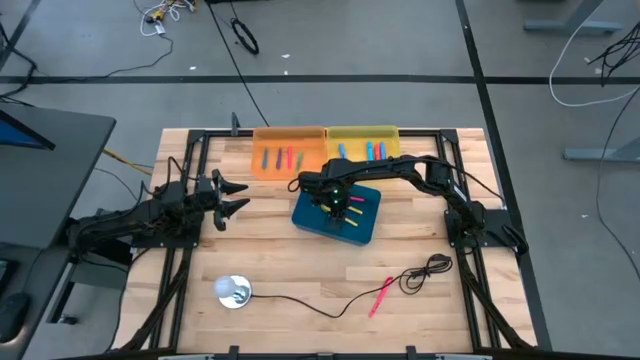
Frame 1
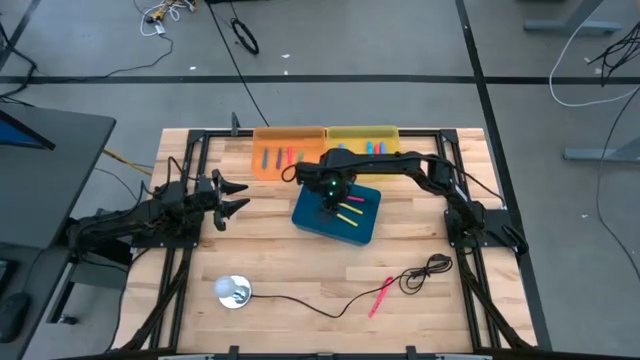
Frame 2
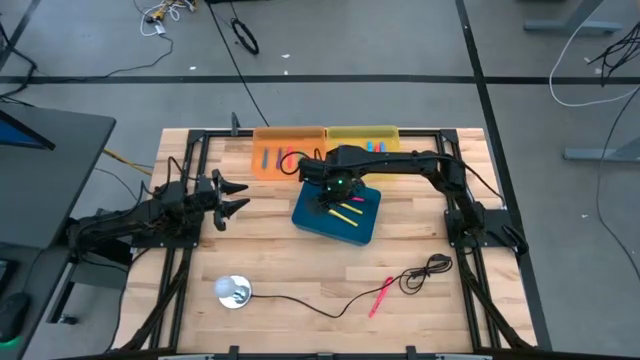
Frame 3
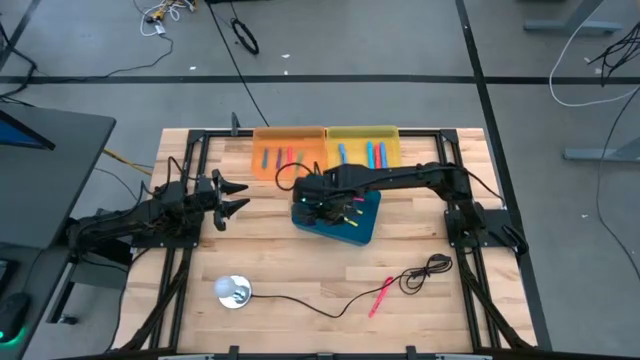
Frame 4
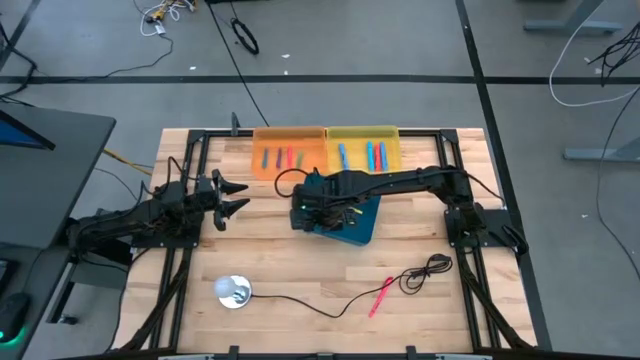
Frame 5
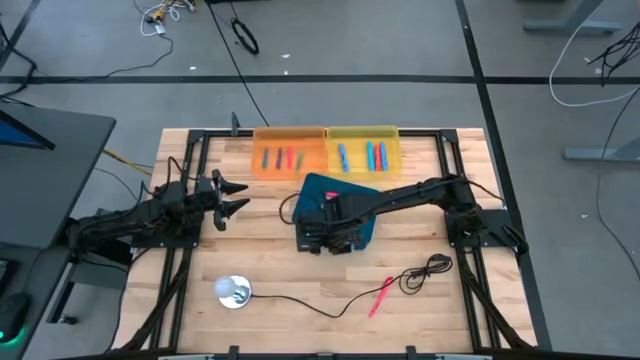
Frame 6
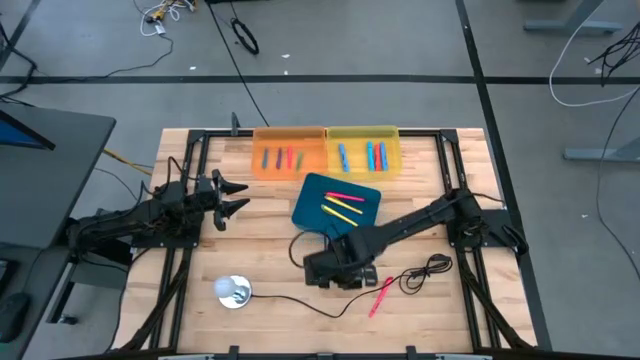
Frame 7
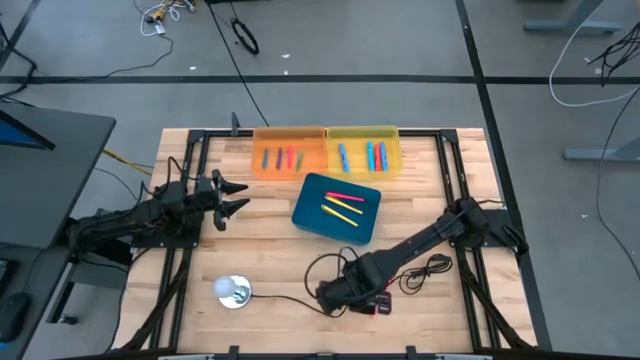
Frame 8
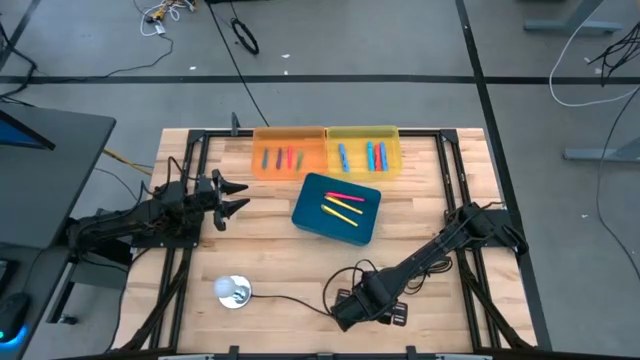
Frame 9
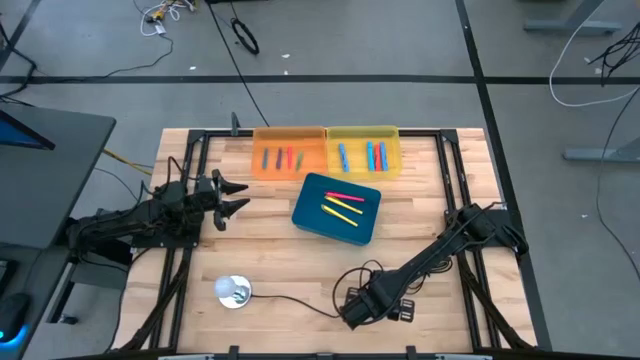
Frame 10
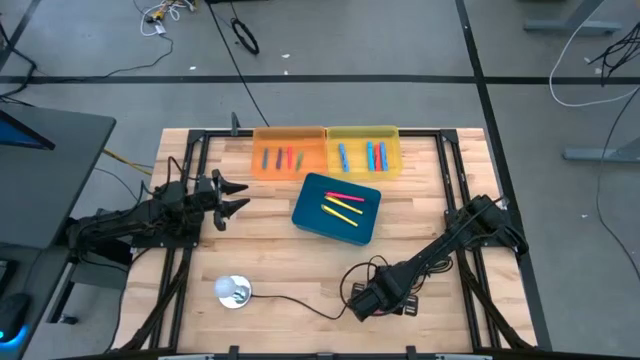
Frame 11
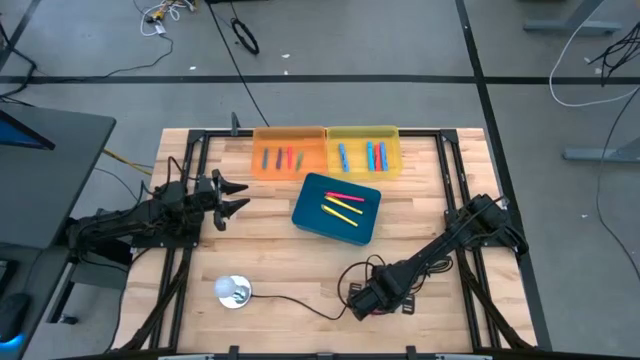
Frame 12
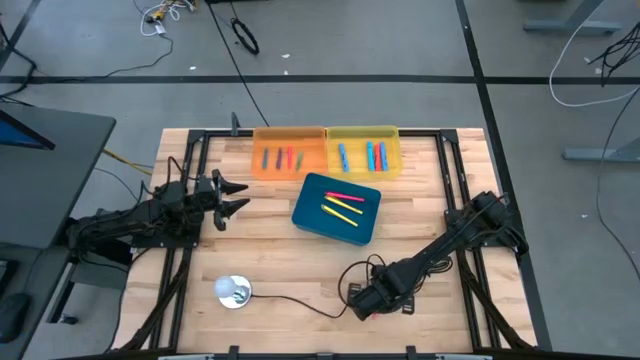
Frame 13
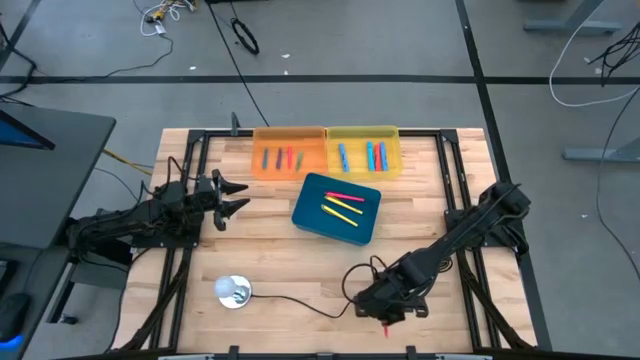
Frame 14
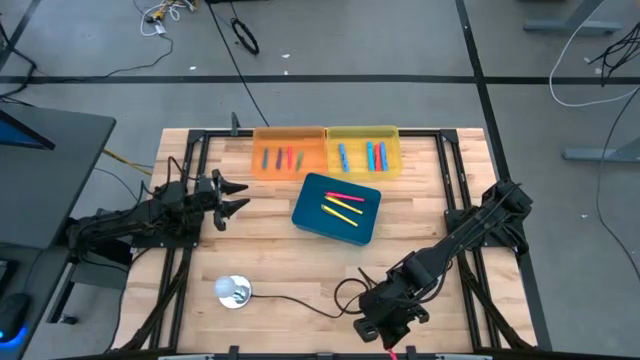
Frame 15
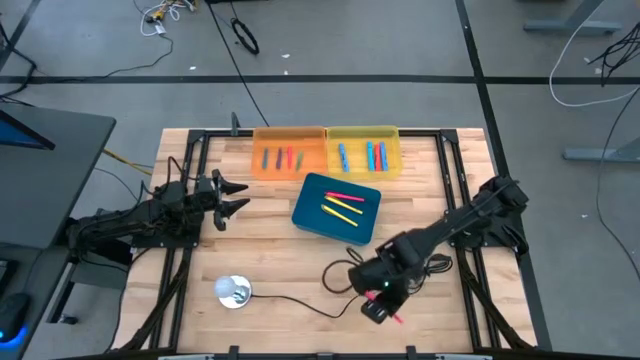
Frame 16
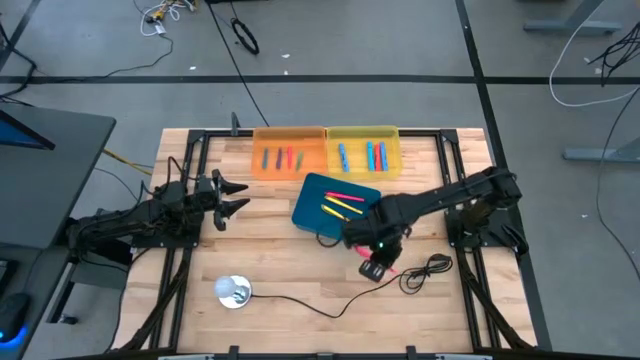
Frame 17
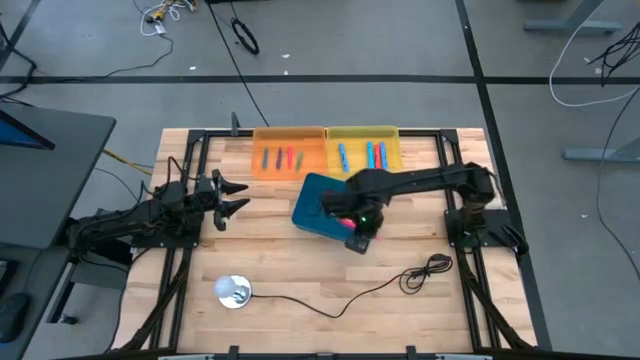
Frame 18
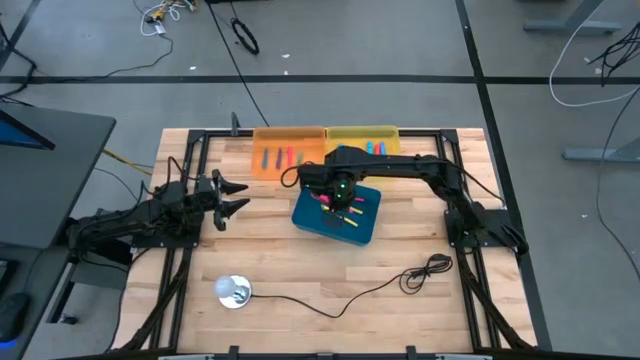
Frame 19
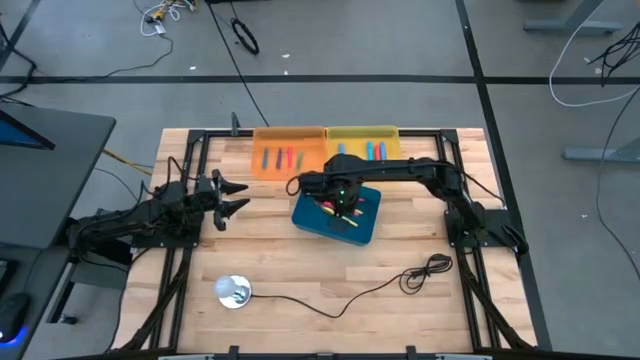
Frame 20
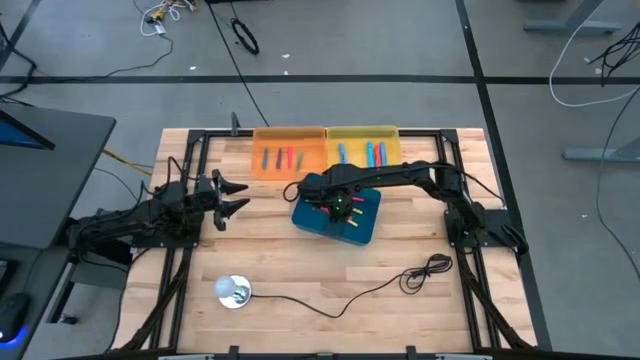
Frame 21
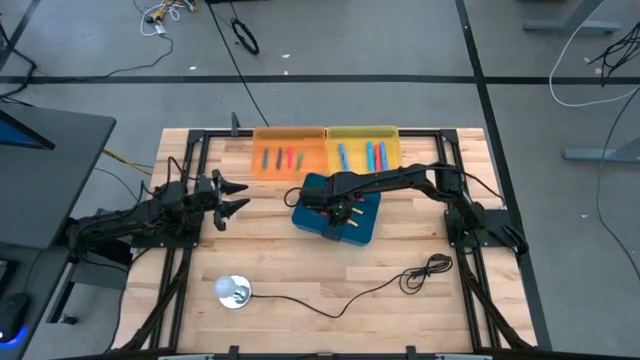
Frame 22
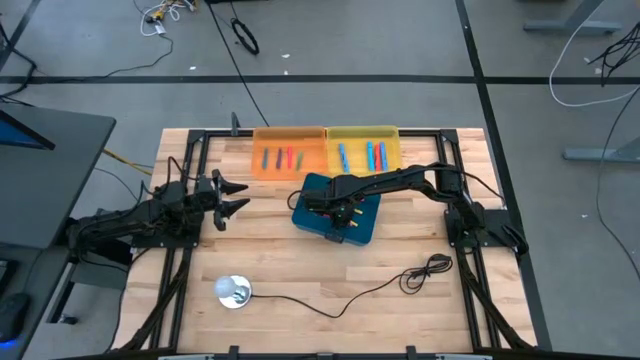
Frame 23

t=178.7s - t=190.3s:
Task: Pick & Place Markers
Put the pink highlighter into the blue bin

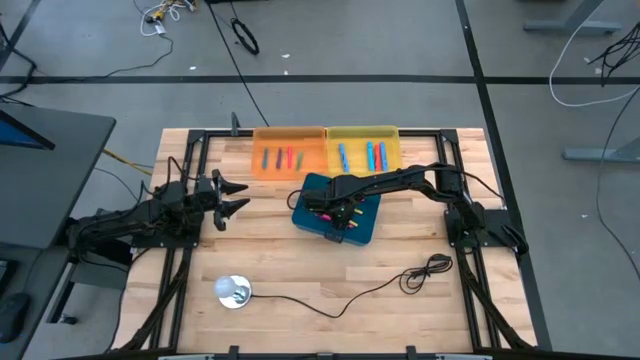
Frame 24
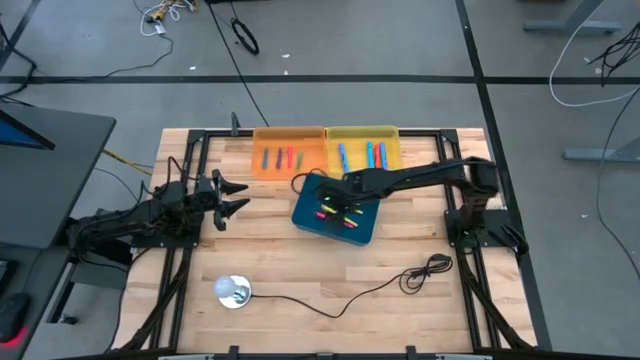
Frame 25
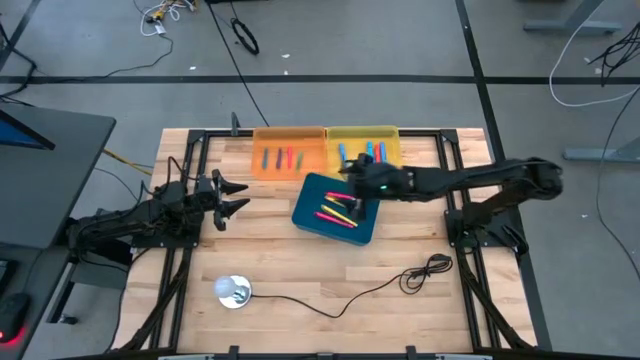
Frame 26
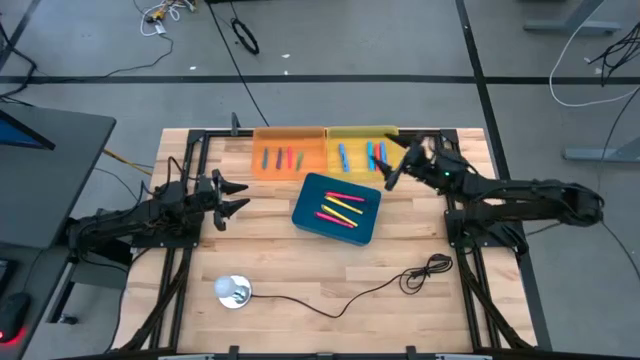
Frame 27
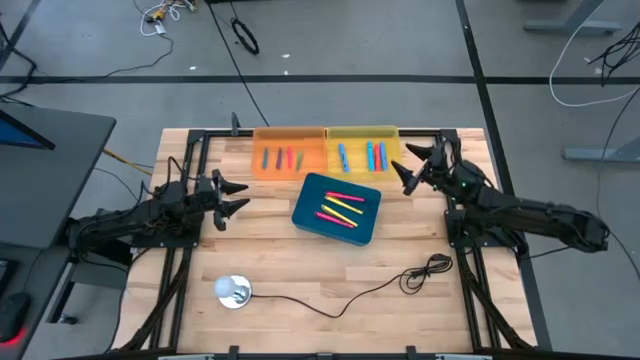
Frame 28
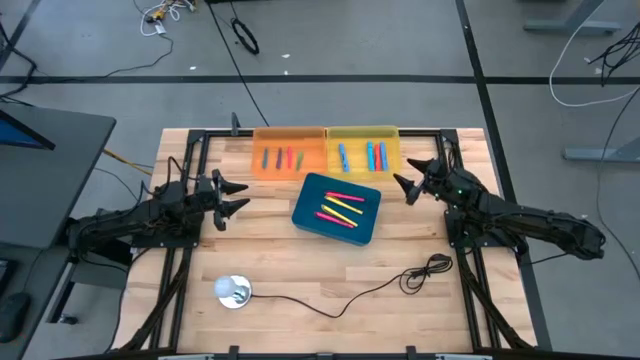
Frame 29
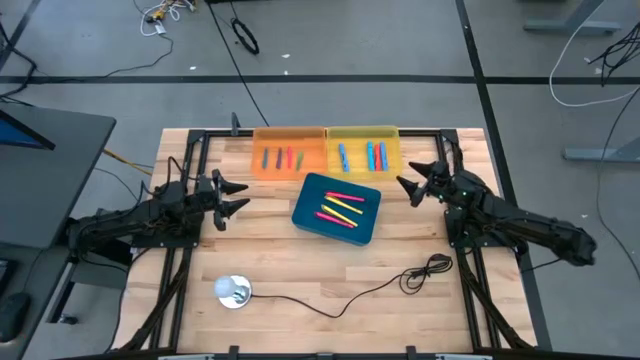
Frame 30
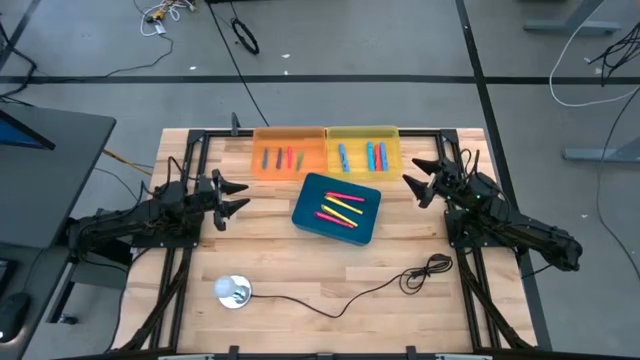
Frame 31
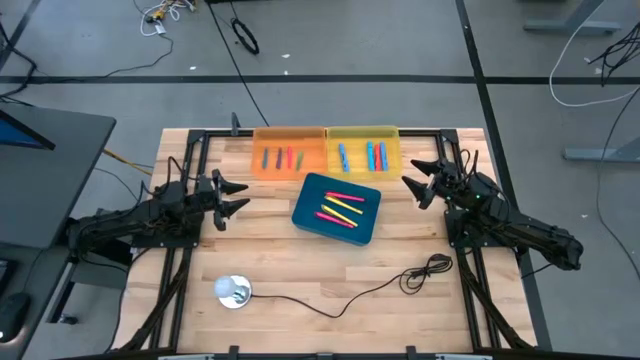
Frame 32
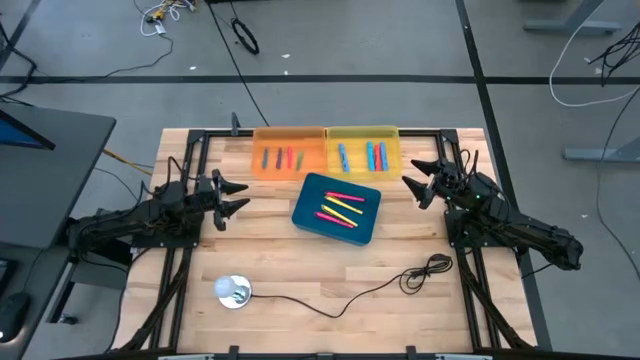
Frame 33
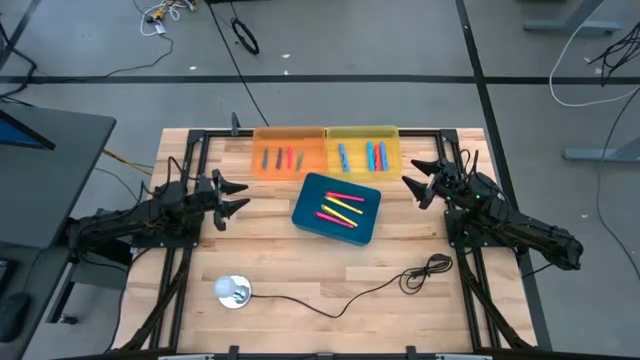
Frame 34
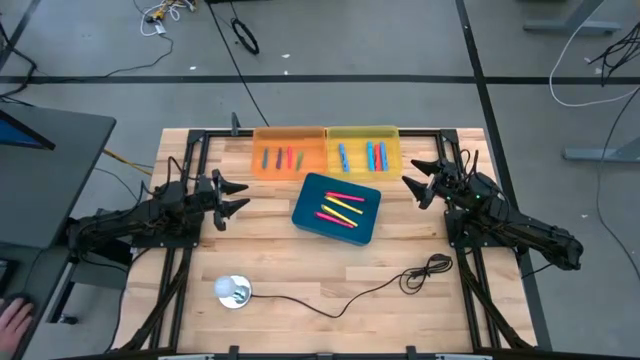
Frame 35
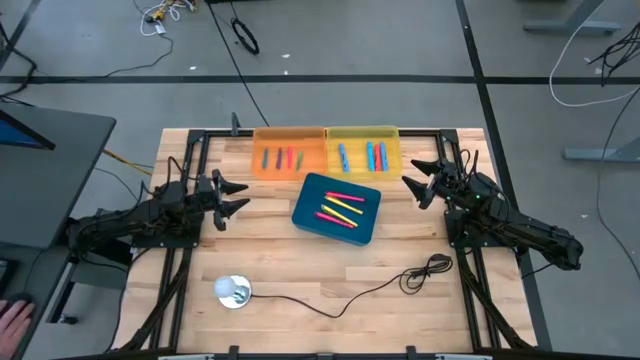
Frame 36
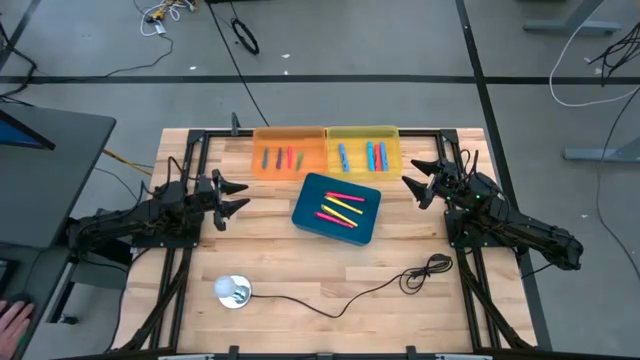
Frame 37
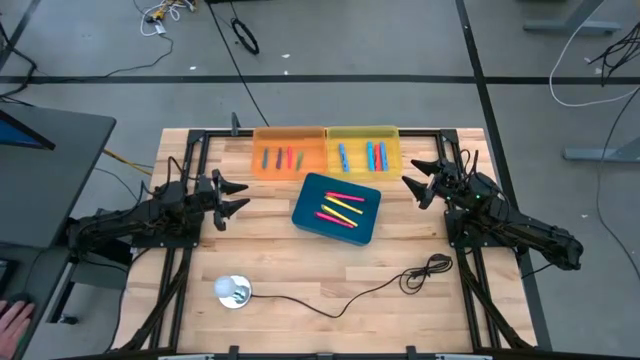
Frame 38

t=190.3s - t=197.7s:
Return to Home Position

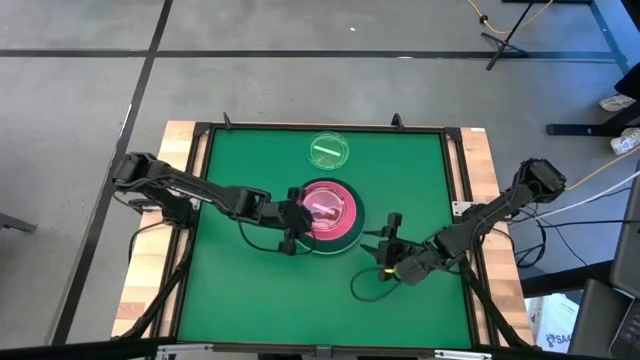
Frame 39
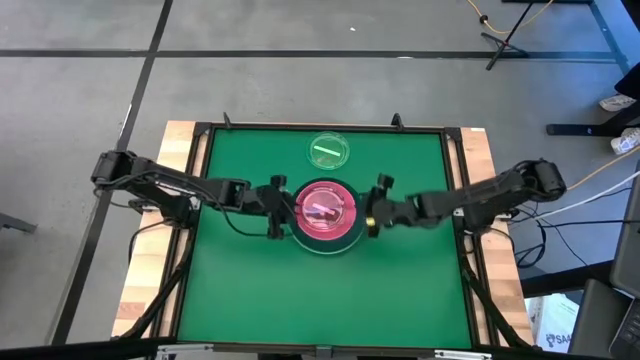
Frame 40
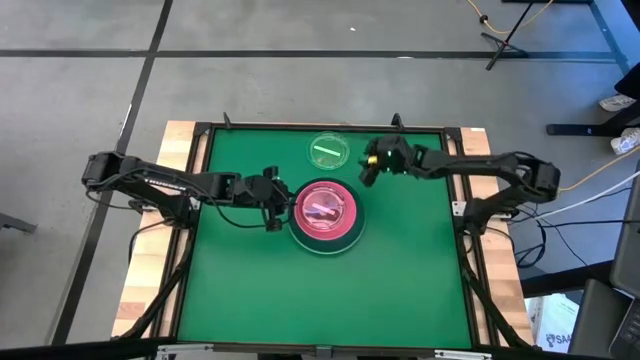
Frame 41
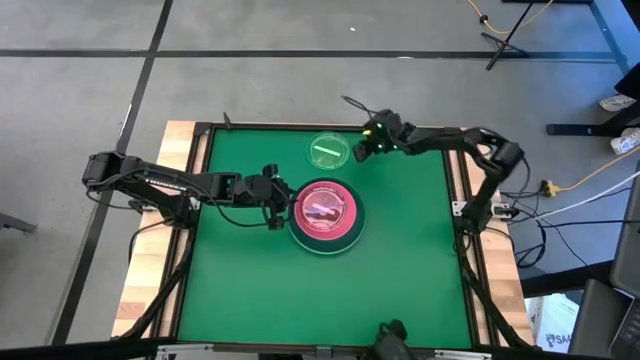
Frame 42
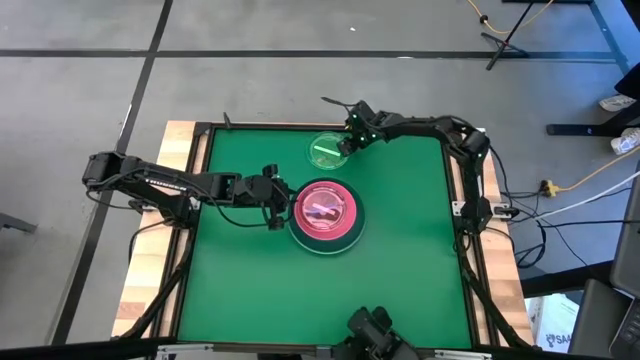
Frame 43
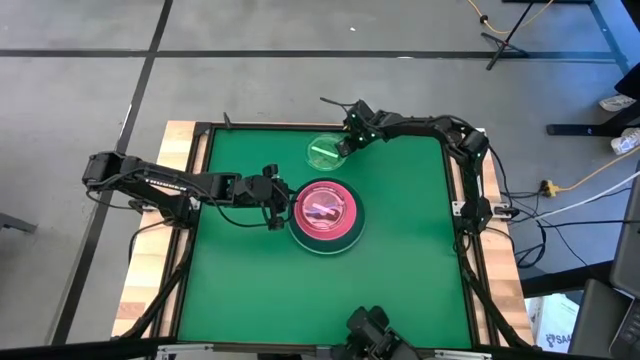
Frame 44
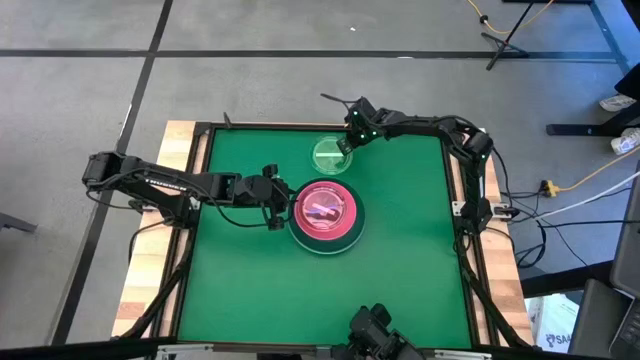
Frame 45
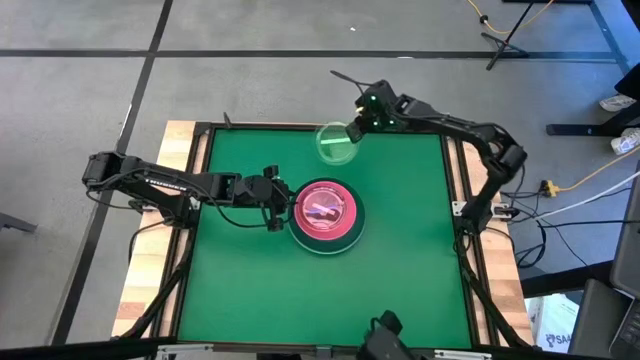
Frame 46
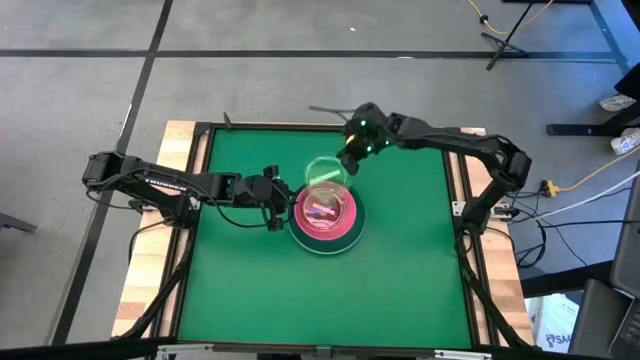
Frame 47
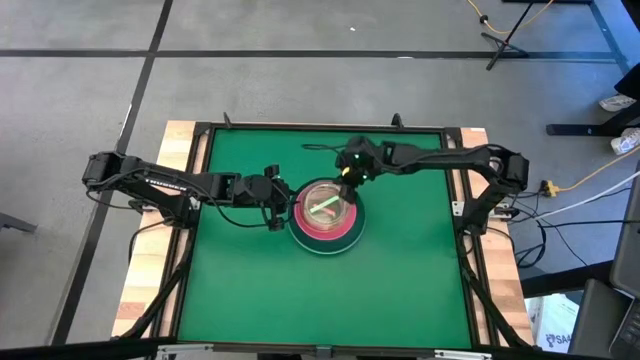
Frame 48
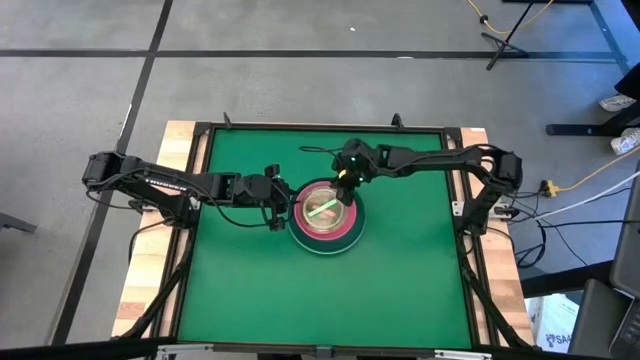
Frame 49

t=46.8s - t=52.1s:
Task: Stack plastic plates
Stack the green transparent plate on the pink transparent plate
